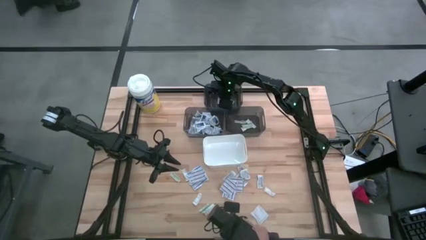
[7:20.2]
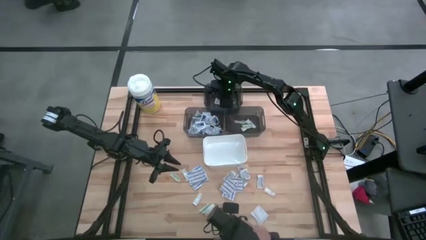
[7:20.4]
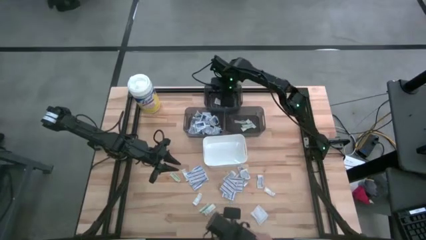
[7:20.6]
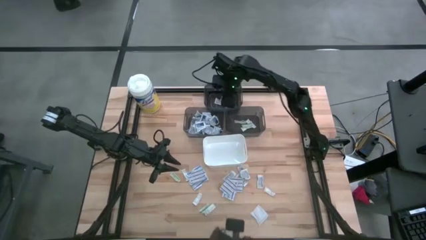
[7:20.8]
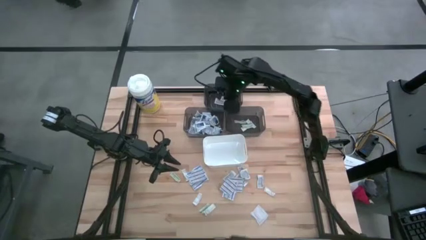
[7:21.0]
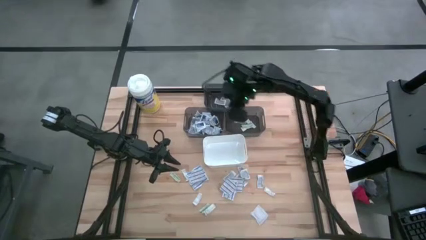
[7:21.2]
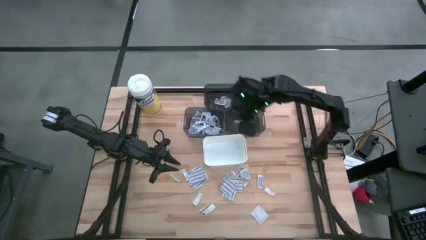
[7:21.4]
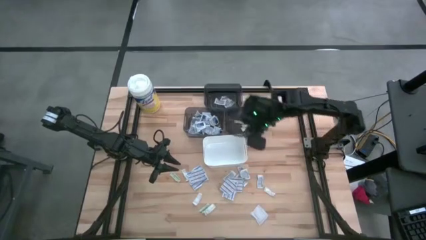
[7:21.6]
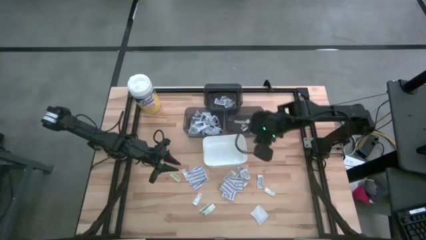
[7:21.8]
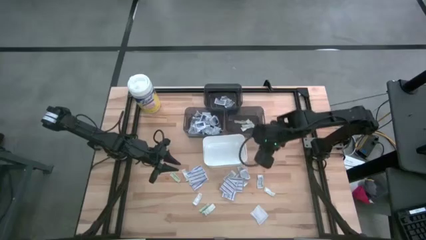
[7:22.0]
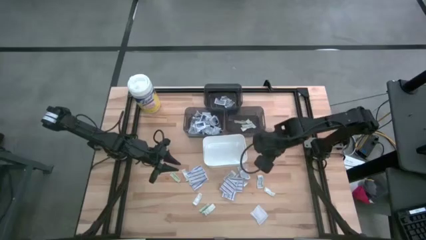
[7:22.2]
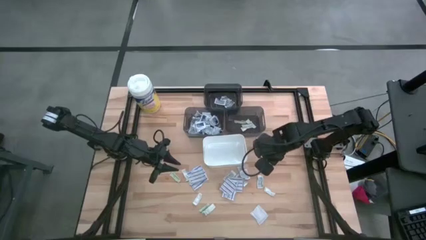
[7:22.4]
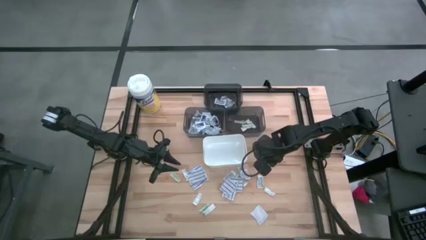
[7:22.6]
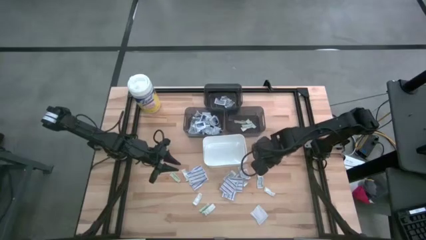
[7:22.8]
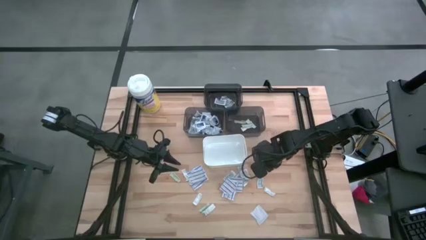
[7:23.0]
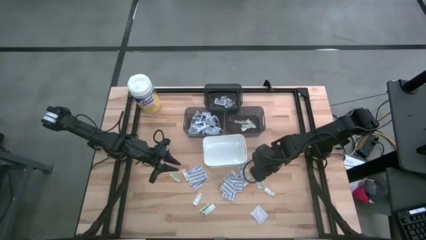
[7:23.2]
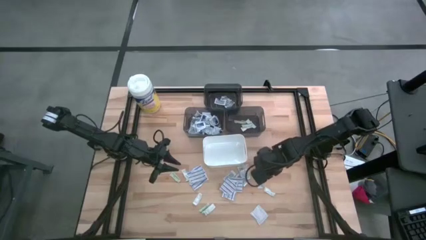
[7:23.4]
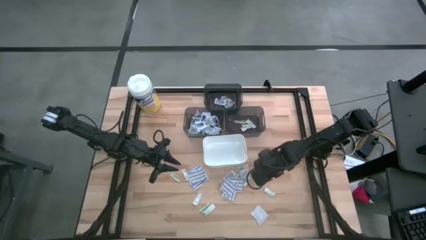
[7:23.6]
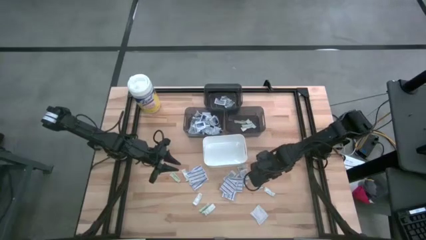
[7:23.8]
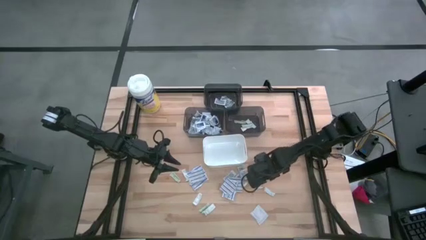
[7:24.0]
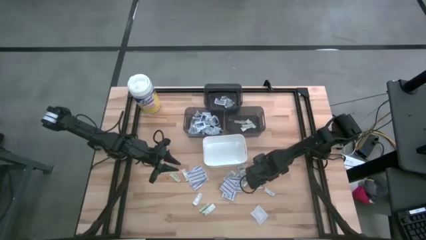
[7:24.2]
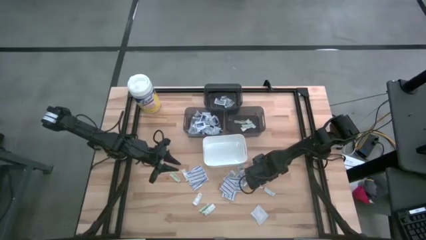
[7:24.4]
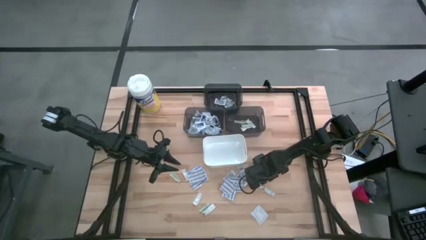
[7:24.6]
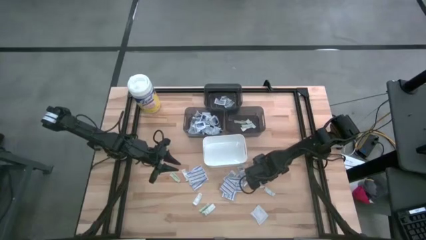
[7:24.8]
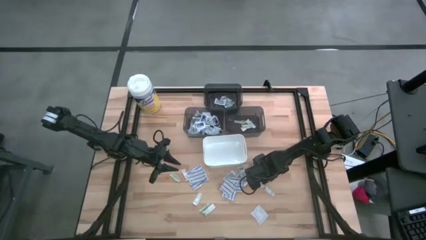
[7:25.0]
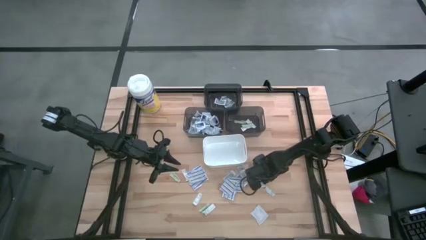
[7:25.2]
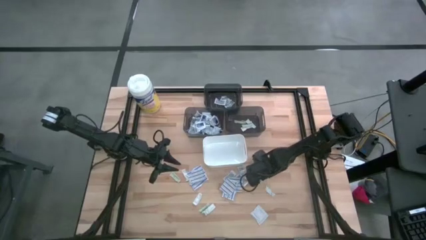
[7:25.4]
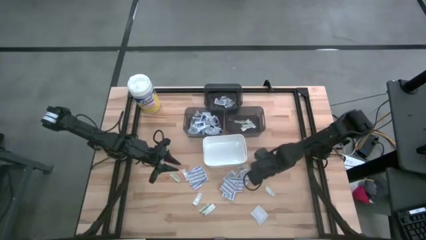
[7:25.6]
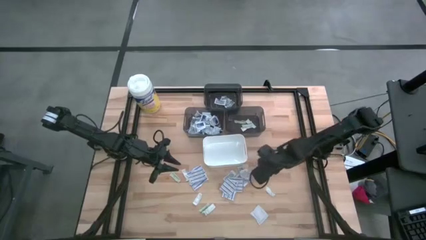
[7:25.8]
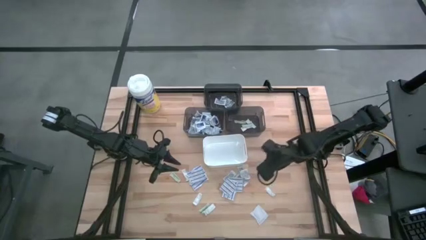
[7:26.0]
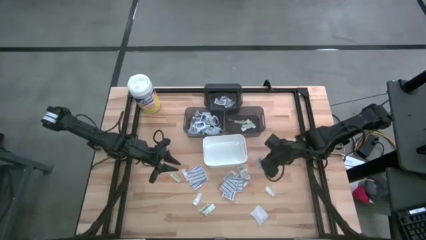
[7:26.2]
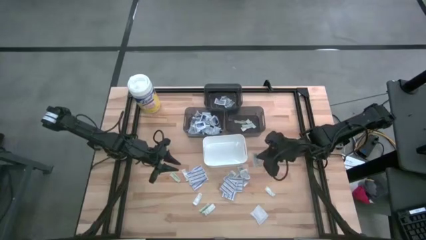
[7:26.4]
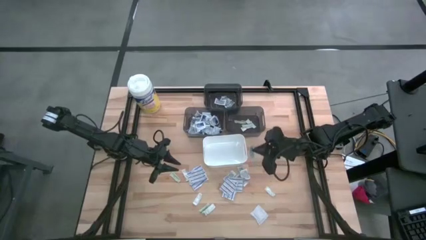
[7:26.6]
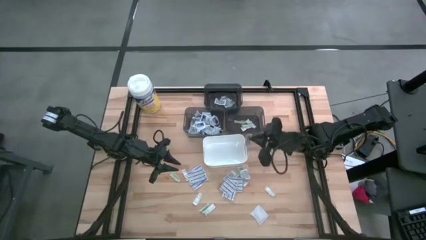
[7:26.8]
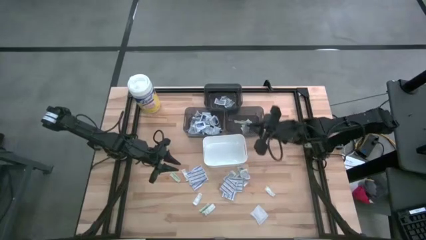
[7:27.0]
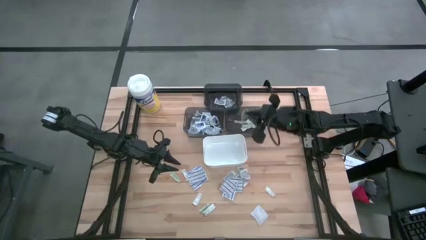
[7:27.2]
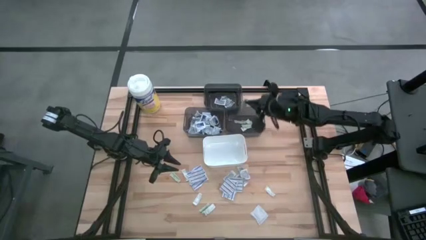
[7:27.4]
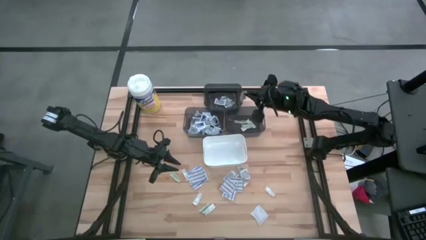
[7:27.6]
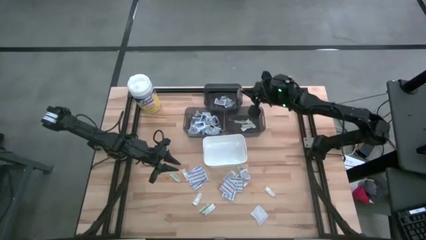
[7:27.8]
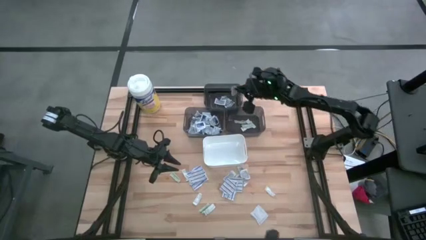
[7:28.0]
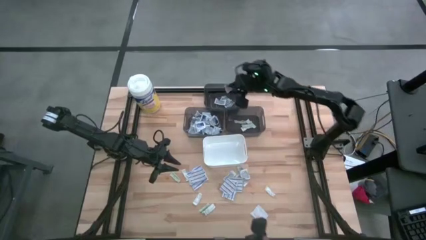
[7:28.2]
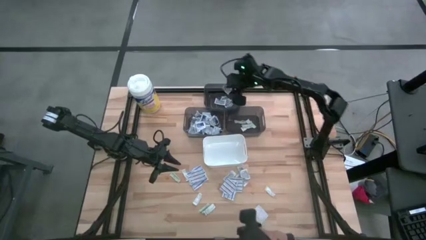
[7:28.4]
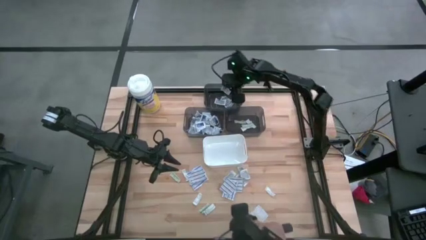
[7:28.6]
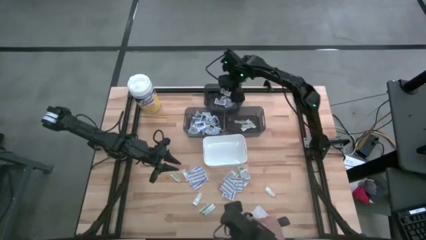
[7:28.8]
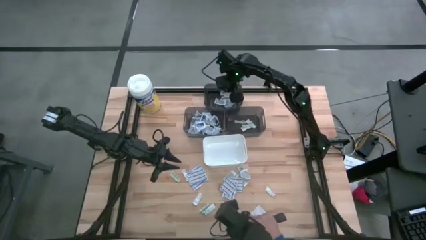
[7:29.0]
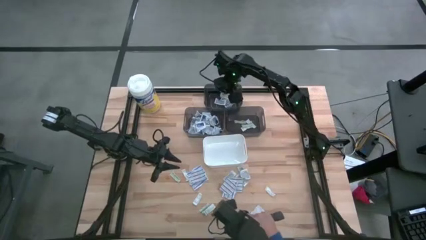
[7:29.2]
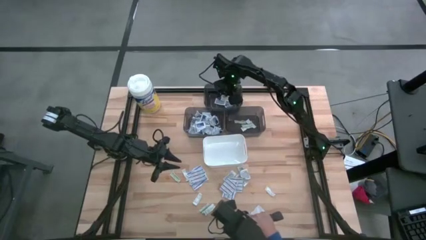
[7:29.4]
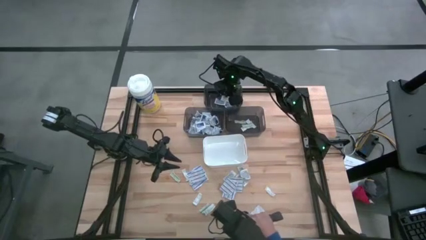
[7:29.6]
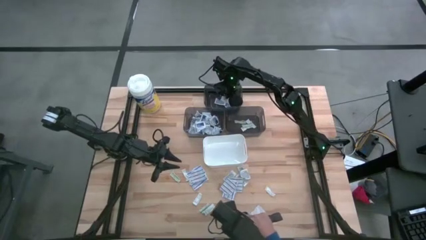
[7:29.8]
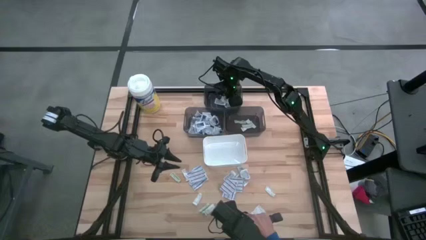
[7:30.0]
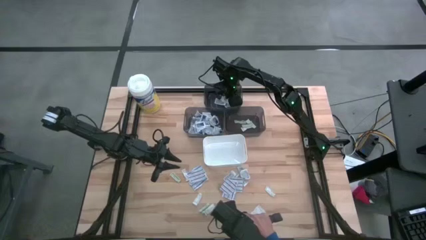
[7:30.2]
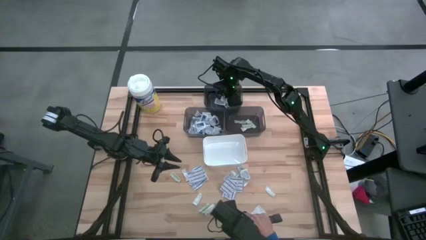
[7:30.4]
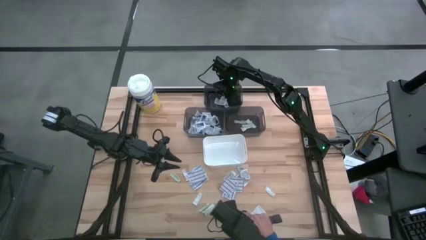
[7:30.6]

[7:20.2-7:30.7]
Task: Pick & Place First Aid Supplies
Put the ointment pack into the top black bin

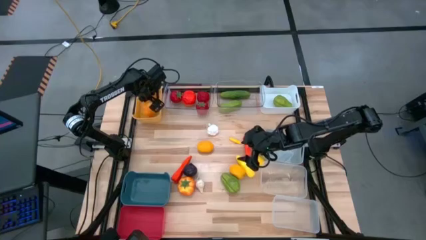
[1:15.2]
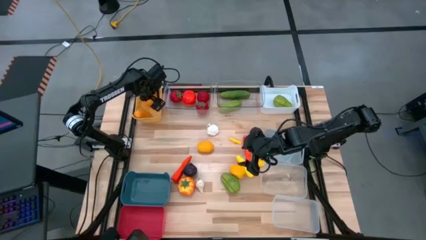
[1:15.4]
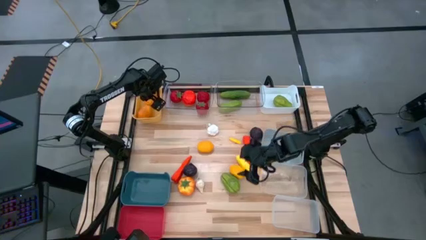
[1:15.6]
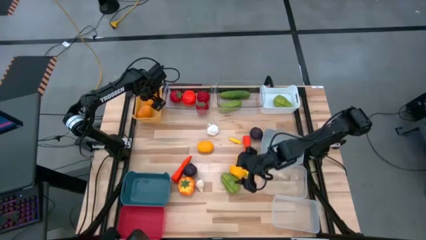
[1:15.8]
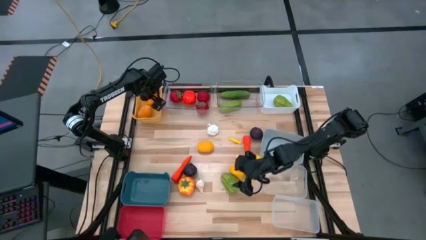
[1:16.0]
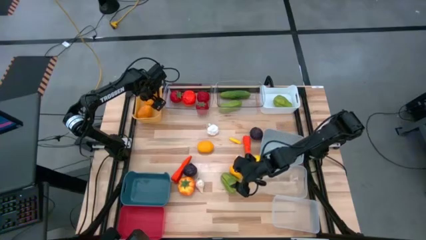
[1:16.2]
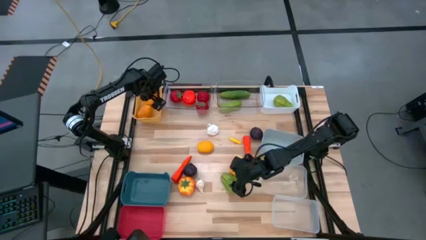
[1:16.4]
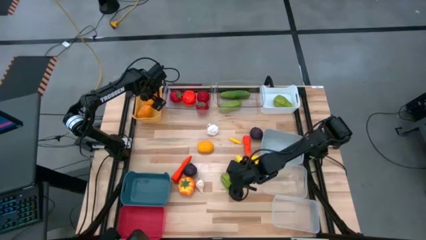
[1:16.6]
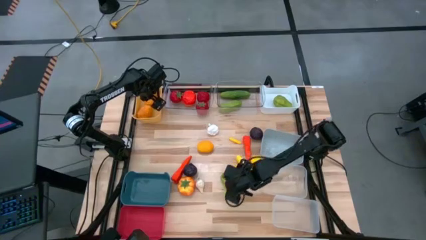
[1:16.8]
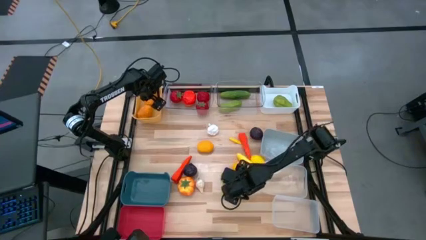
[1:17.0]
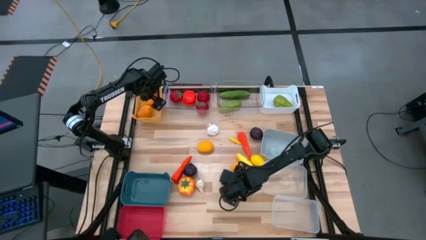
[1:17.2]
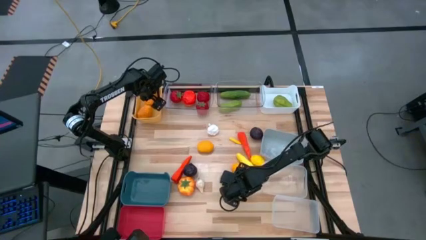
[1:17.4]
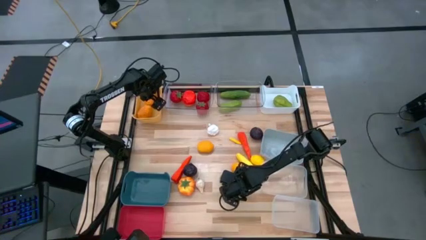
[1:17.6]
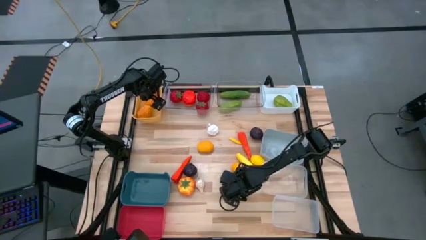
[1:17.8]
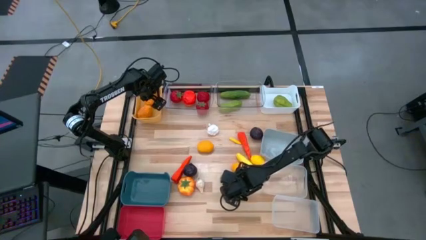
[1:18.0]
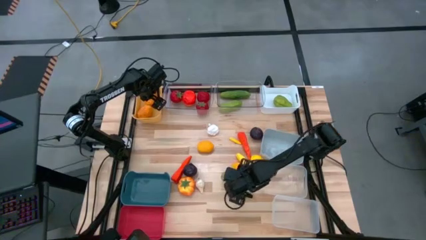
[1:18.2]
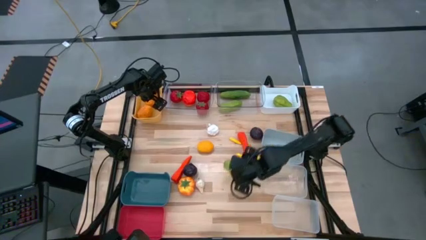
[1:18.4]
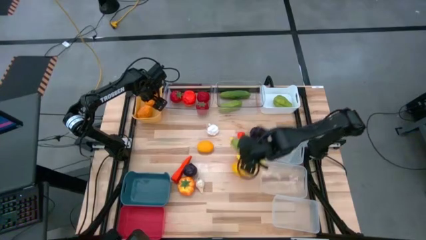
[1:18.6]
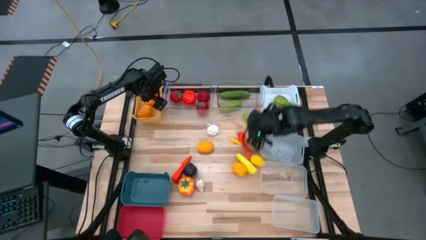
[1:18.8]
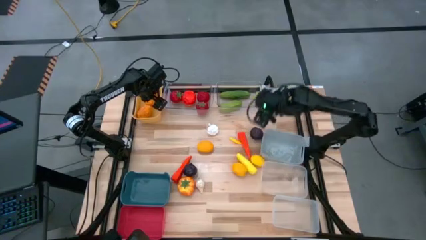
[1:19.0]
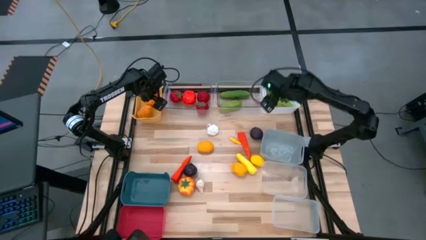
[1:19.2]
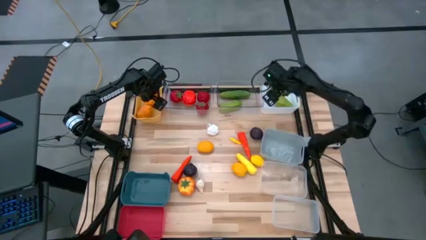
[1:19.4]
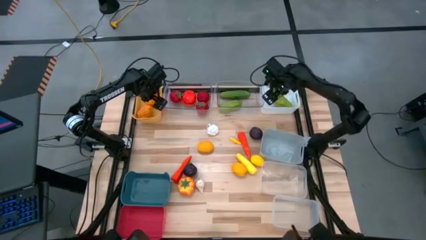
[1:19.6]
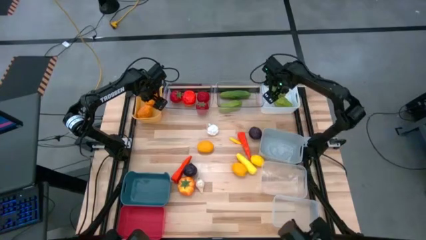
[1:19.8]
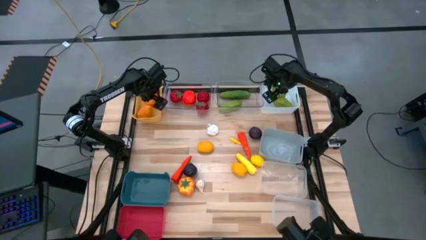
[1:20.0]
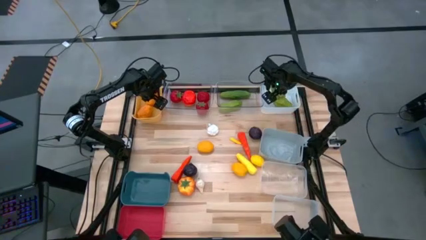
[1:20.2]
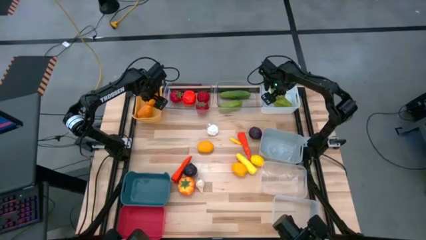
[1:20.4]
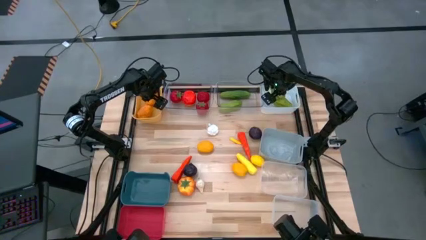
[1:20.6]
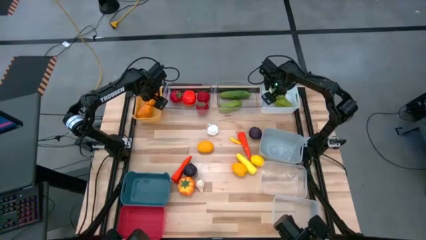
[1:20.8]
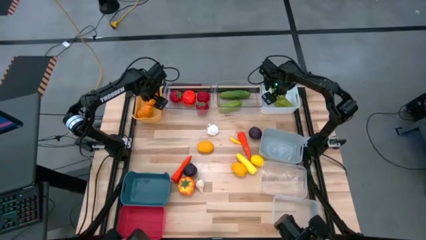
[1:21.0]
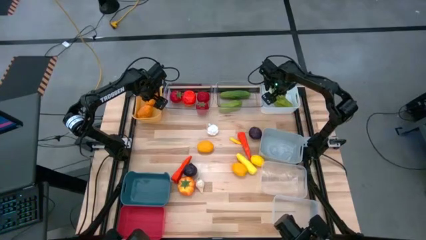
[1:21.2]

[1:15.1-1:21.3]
Task: Sort produce into baskets
Put the green chayote into the white bin
